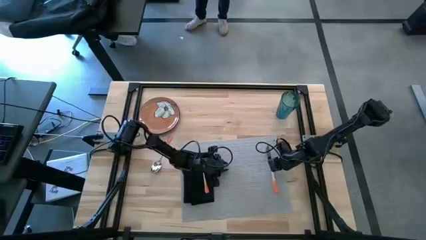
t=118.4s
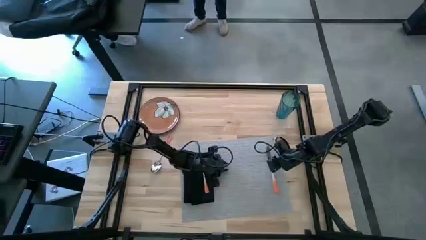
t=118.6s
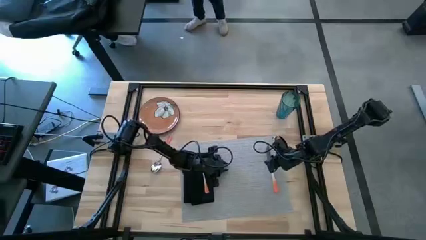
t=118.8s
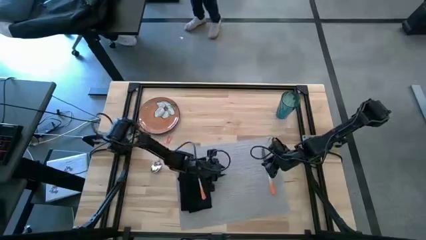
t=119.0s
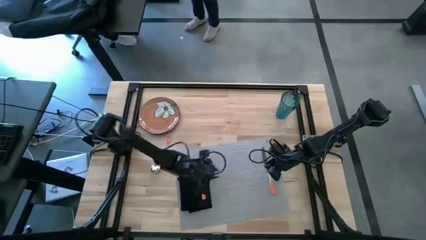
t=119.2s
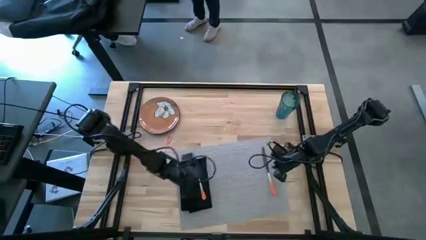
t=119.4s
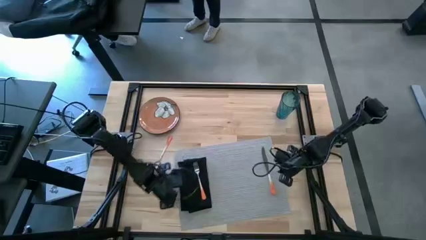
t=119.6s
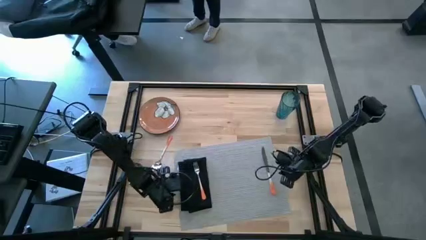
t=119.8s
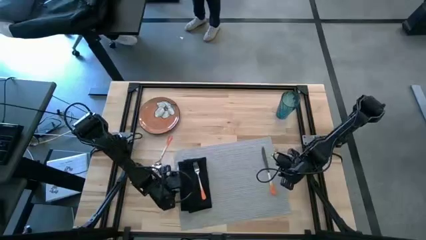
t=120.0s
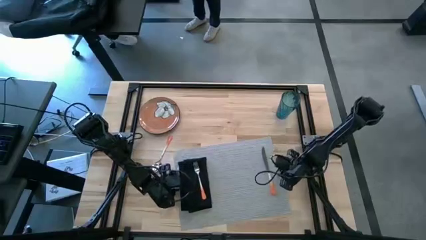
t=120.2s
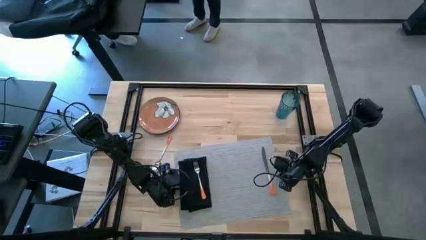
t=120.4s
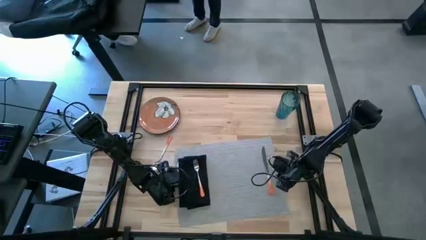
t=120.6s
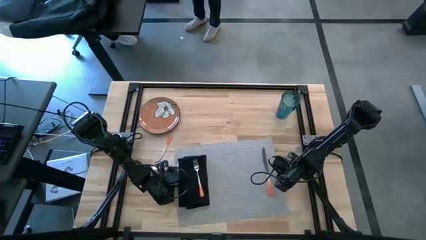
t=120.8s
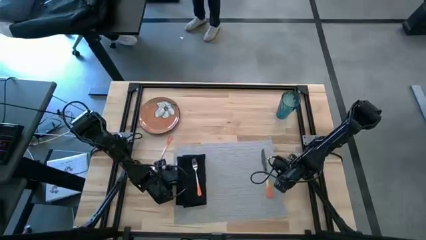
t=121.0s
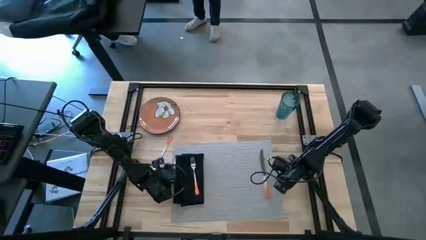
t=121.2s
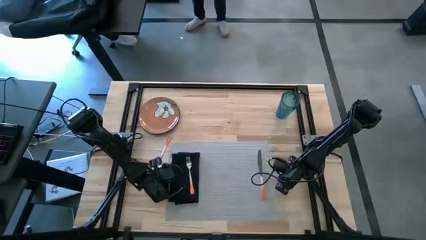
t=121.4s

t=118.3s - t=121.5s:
Task: Set table place
Adjust the gray placemat

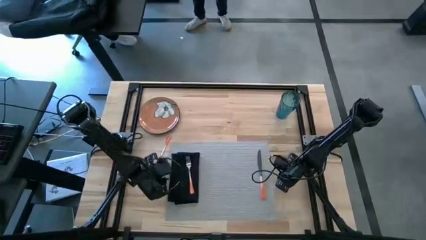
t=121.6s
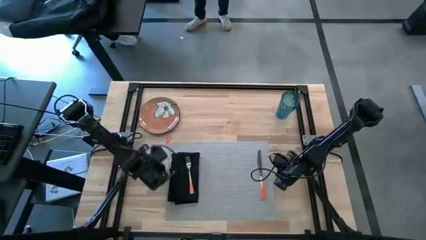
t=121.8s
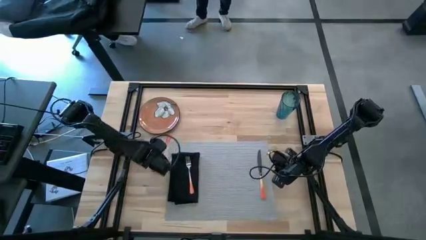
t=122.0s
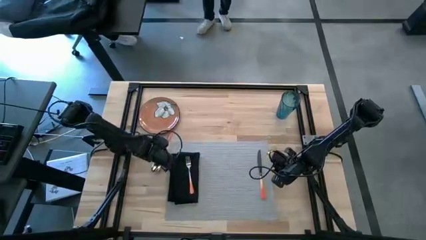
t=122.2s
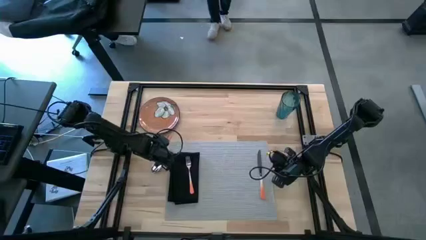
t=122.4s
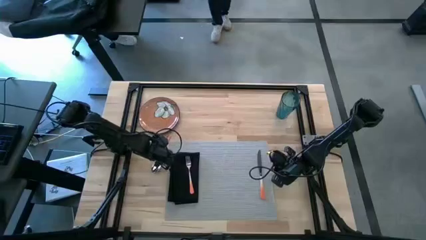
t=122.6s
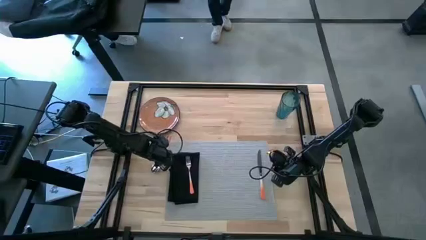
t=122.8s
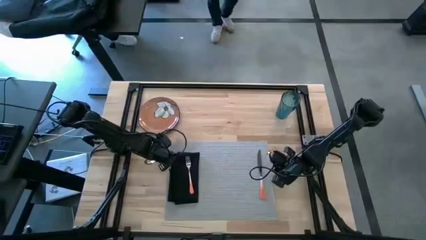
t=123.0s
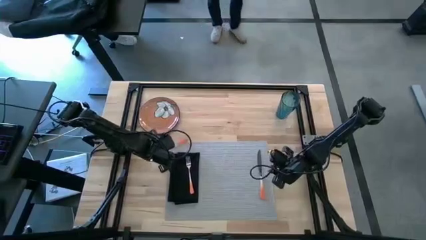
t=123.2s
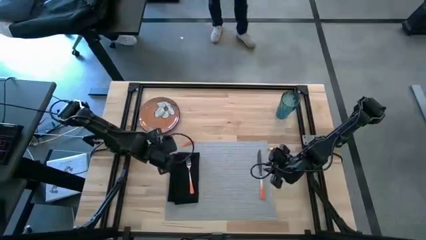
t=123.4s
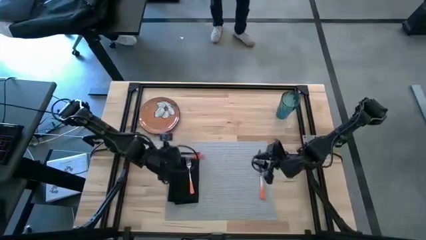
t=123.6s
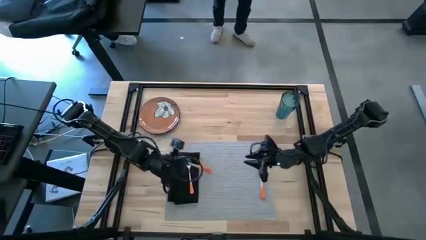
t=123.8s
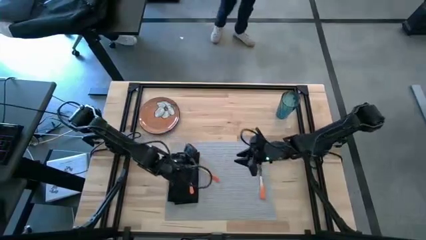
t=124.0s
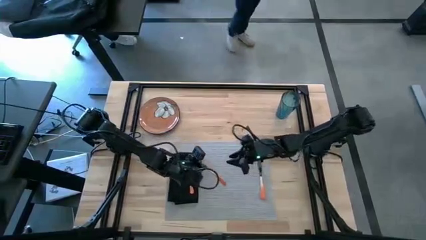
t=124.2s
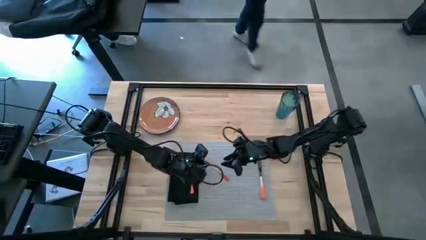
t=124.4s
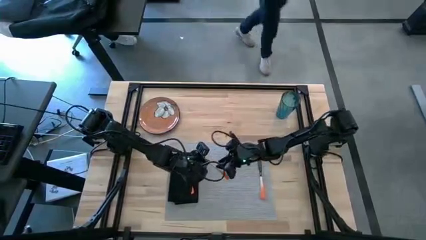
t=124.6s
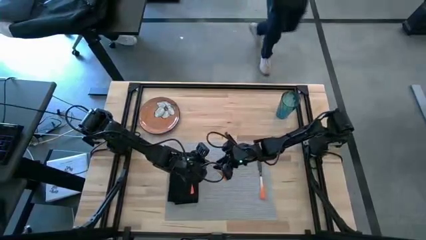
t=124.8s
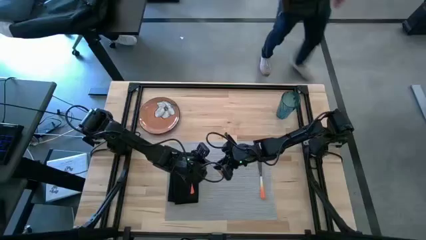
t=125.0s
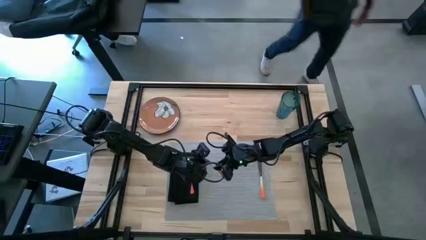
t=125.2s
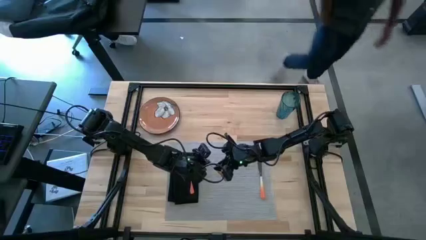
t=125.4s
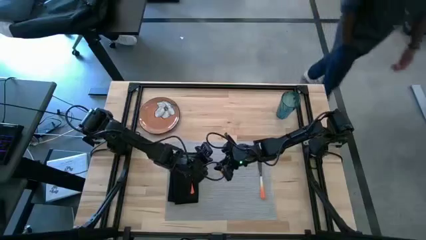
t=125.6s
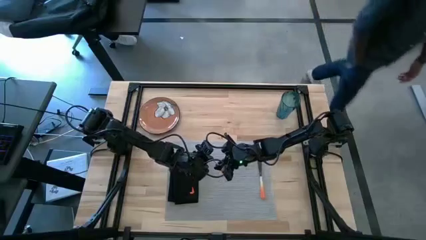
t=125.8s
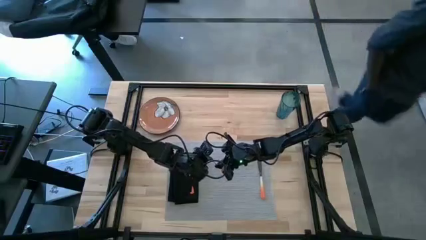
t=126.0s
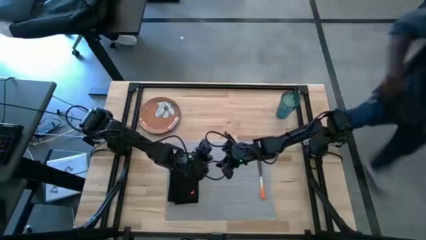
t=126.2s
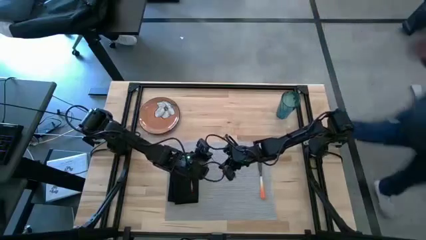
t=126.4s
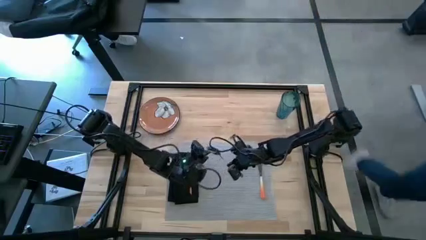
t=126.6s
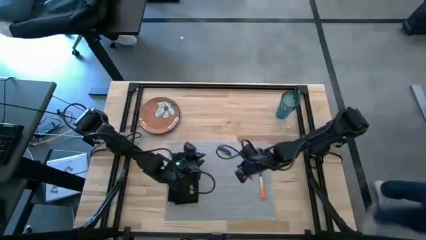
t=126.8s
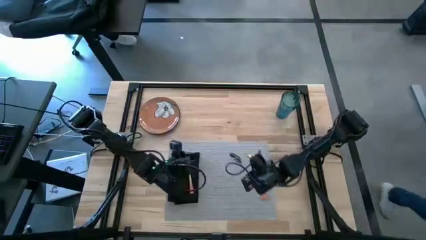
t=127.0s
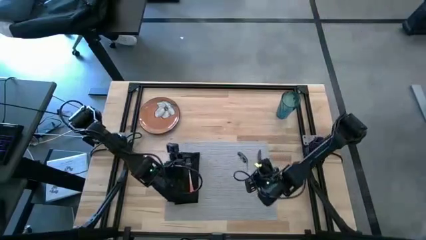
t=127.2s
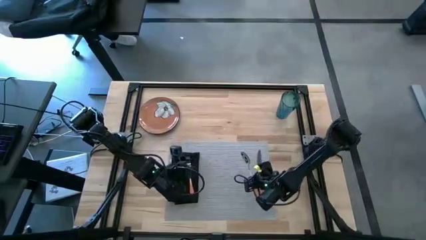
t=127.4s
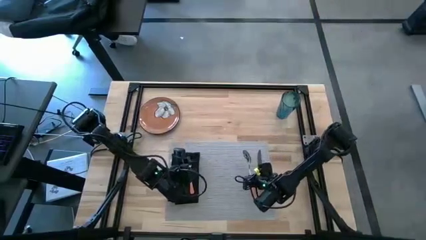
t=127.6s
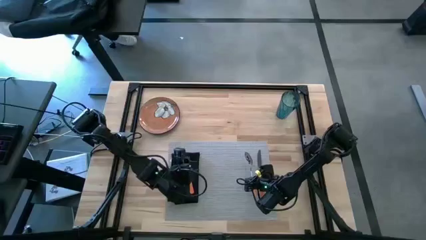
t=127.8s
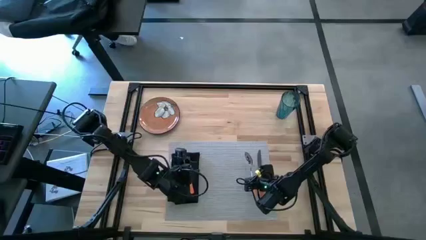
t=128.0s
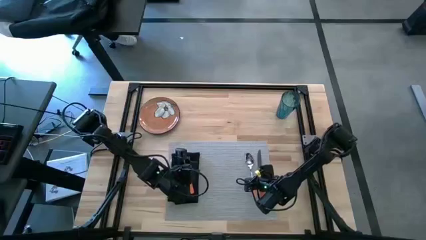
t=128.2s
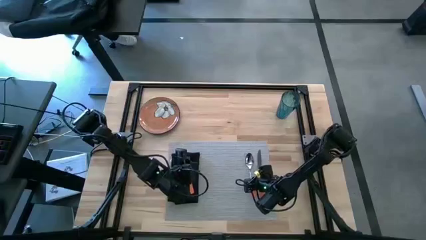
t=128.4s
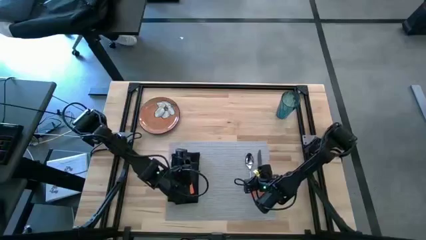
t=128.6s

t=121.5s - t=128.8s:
Put the orange spoon on the gray placemat

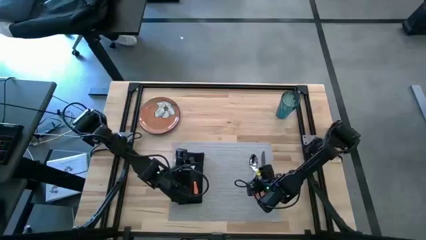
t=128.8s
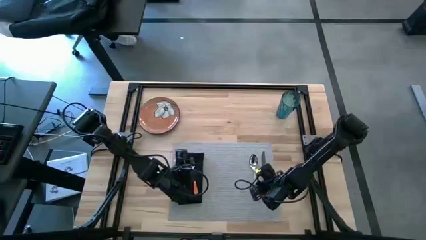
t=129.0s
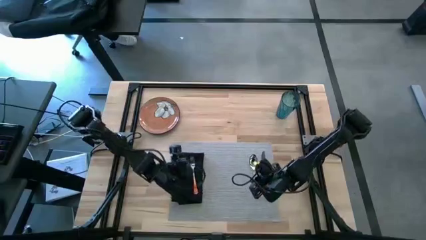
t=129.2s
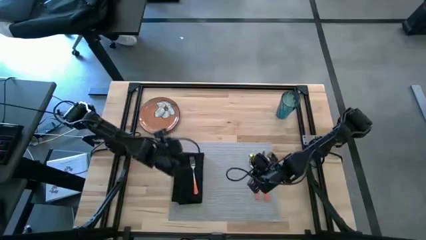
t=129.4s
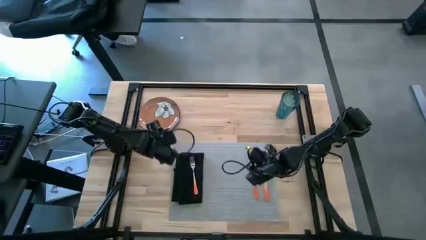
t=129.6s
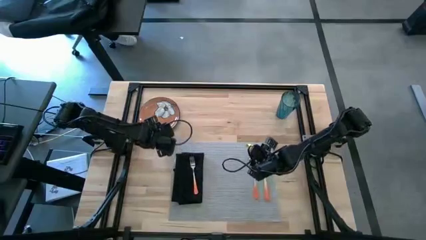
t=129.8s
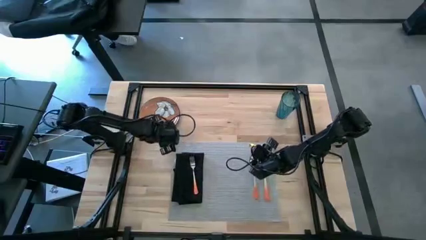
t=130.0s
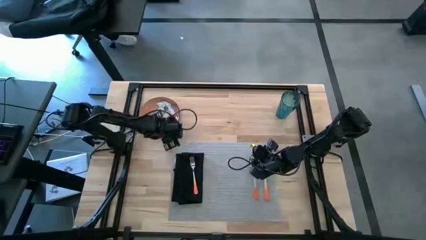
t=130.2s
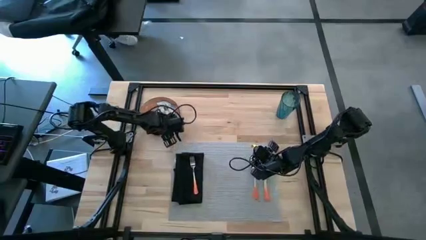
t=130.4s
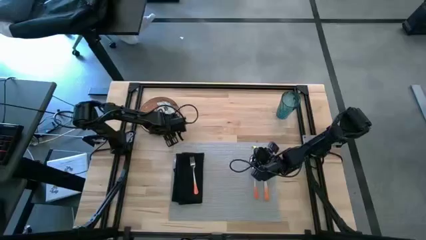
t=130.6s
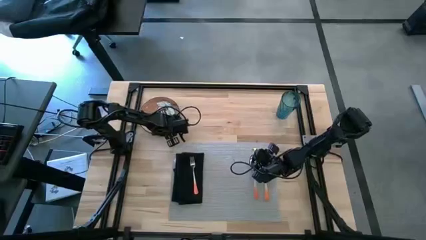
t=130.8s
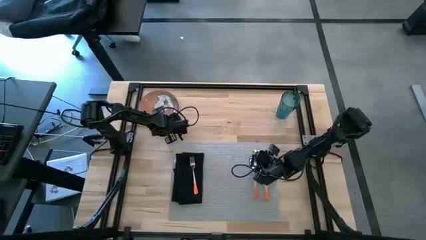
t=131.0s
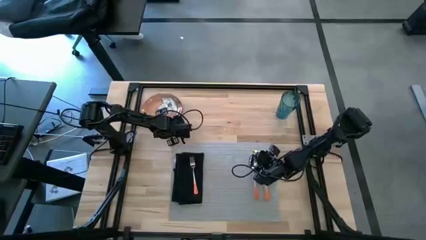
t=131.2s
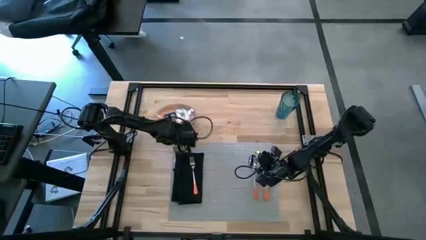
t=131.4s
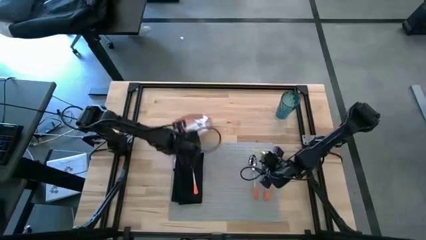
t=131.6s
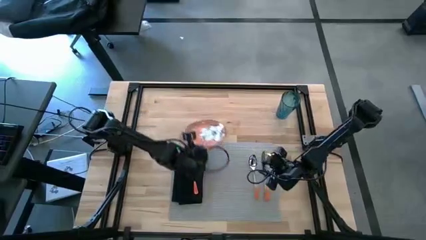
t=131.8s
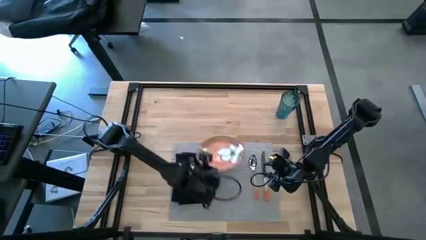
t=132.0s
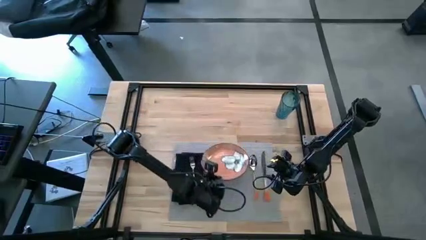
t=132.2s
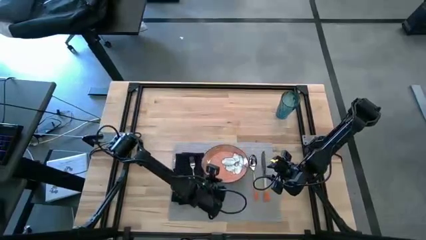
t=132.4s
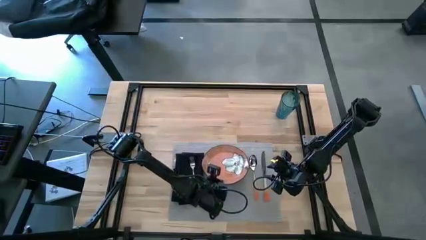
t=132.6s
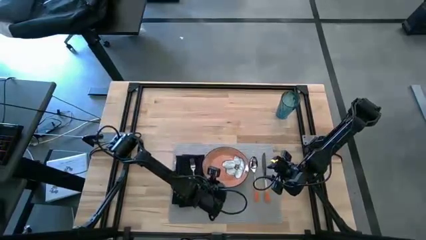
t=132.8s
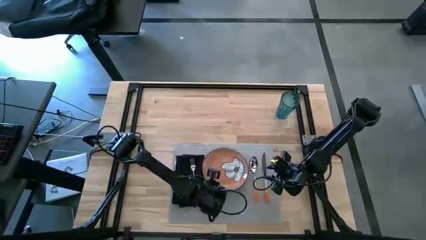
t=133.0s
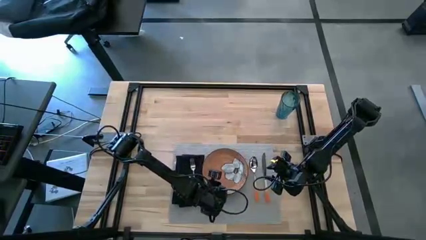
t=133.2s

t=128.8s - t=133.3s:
Put the orange plate on the gray placemat

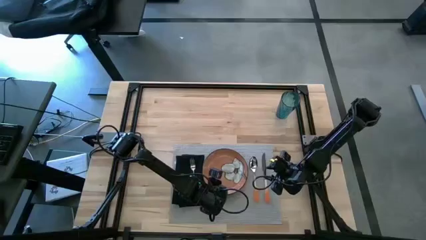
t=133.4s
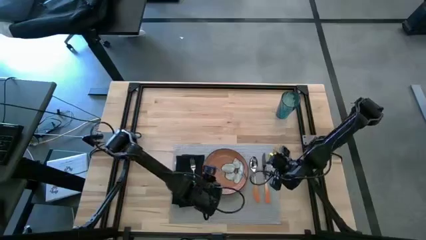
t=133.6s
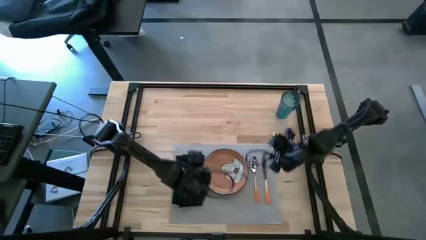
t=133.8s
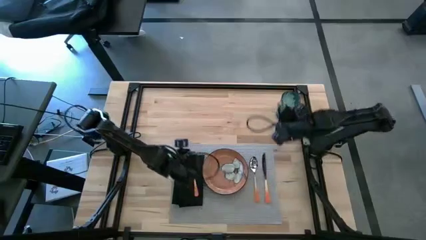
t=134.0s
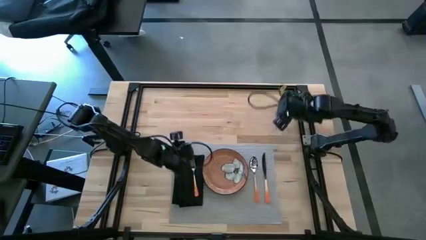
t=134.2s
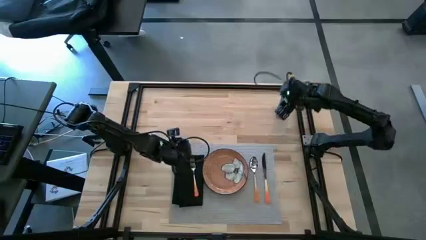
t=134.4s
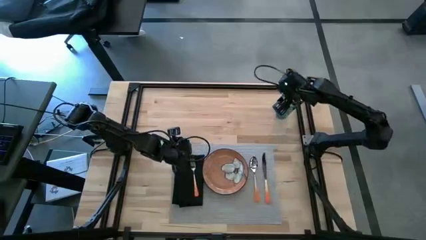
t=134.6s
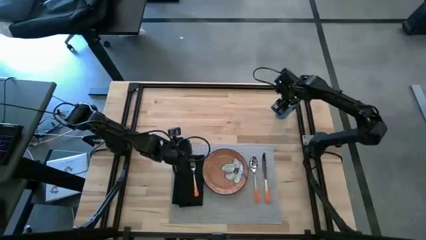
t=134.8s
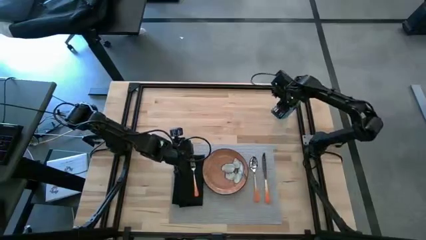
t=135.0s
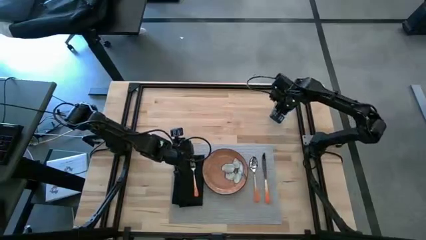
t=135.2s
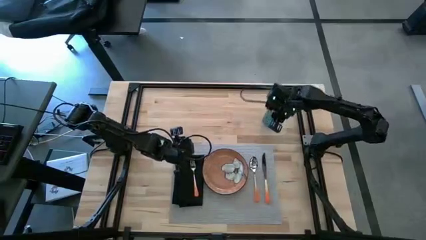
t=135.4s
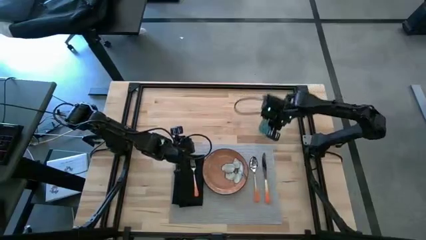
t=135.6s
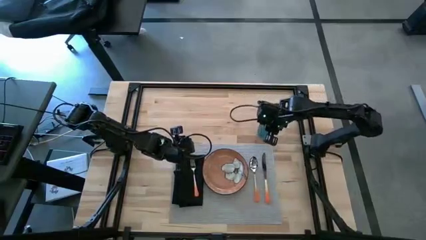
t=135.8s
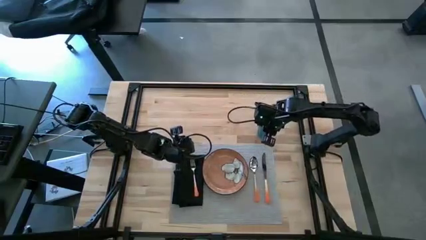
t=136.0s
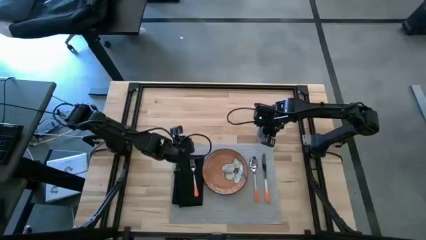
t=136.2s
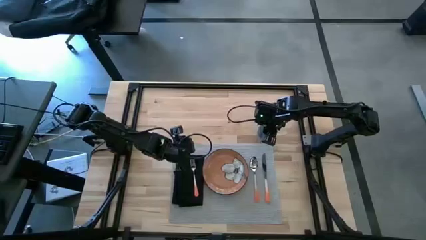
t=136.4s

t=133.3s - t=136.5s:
Move the blue cup on the upper right side of the placemat
